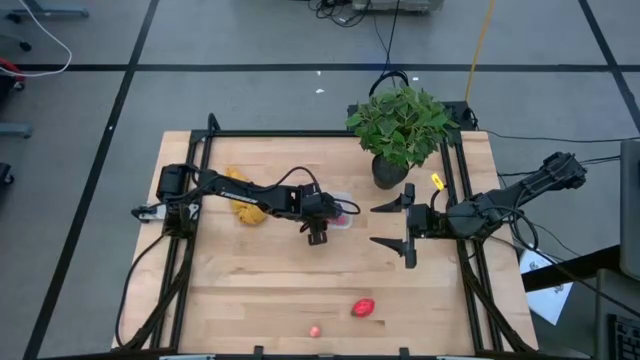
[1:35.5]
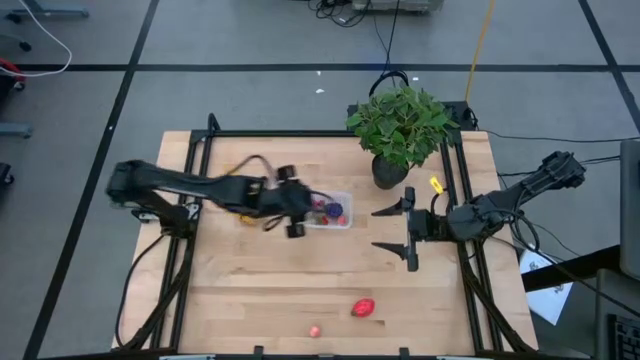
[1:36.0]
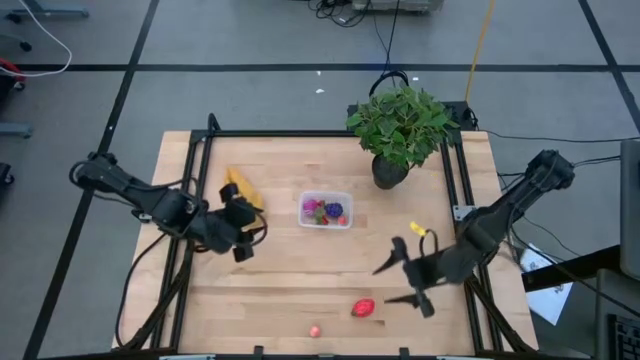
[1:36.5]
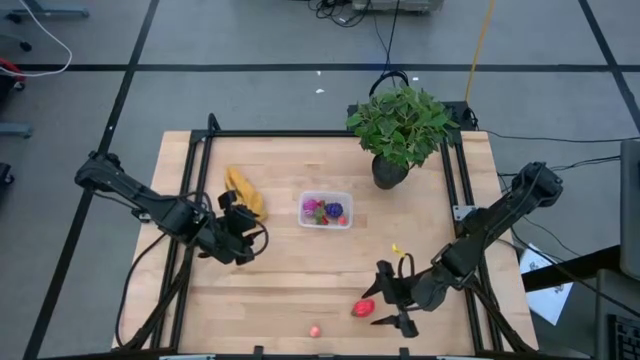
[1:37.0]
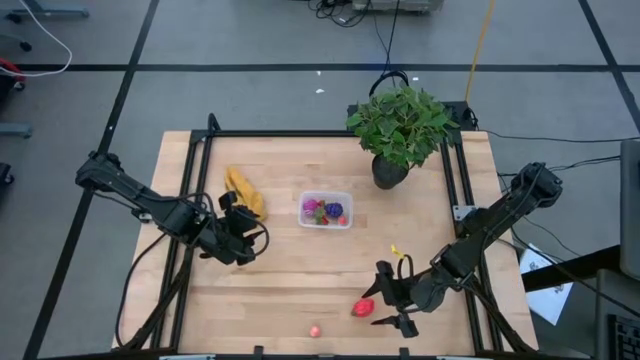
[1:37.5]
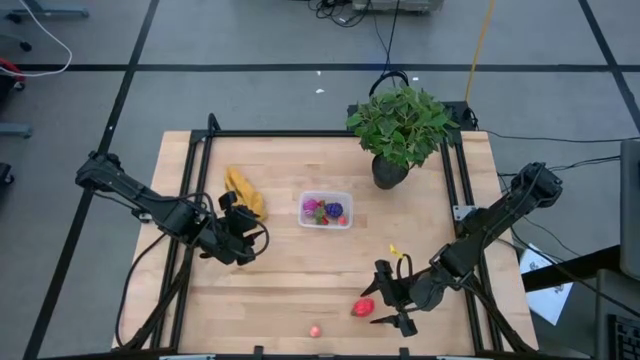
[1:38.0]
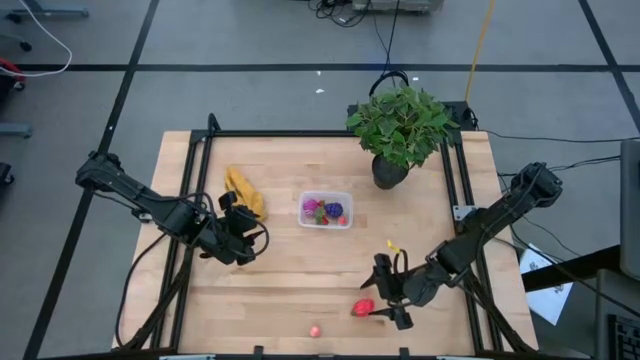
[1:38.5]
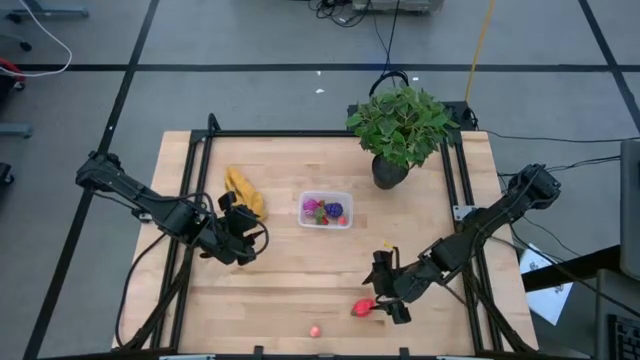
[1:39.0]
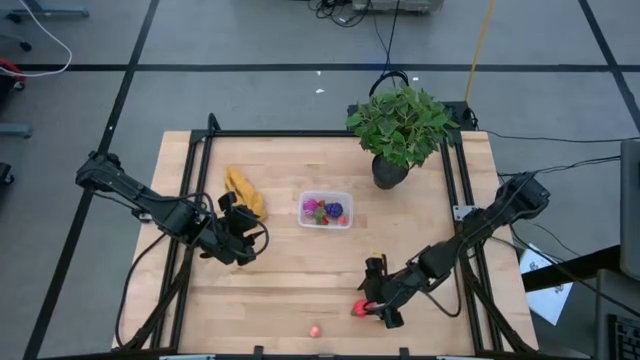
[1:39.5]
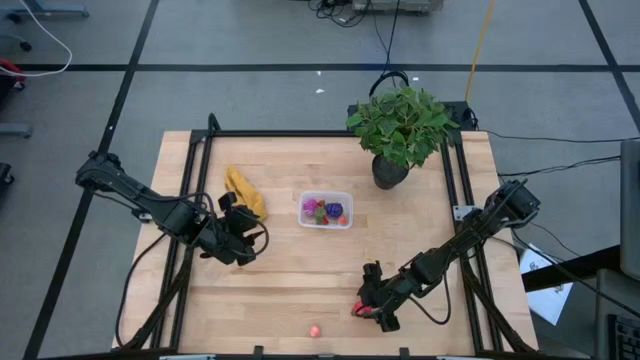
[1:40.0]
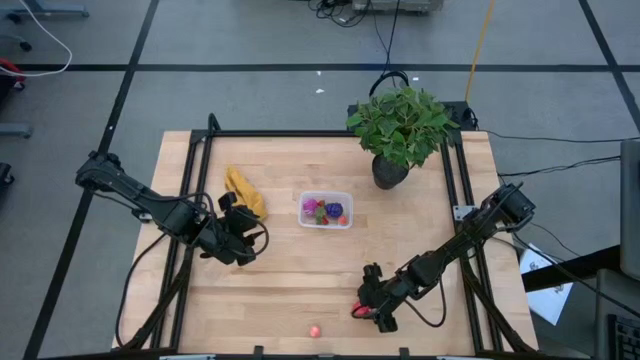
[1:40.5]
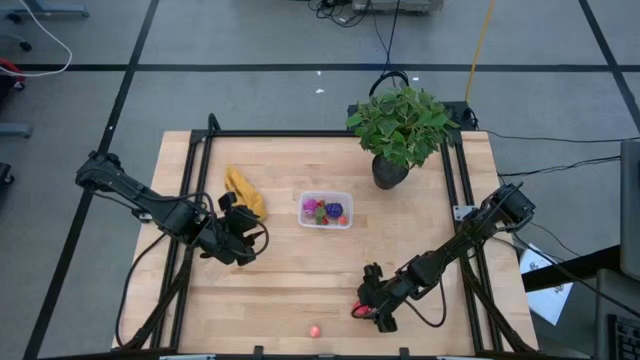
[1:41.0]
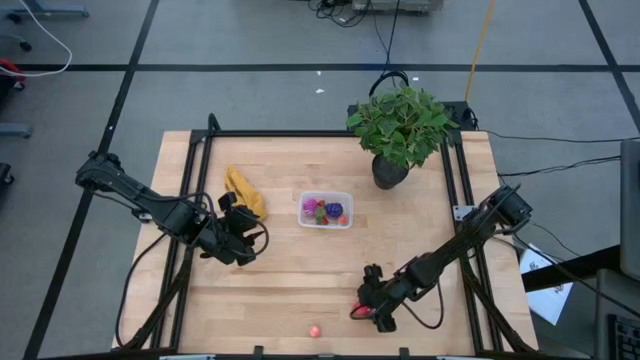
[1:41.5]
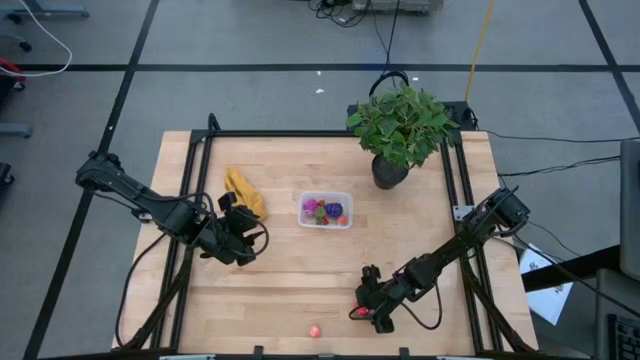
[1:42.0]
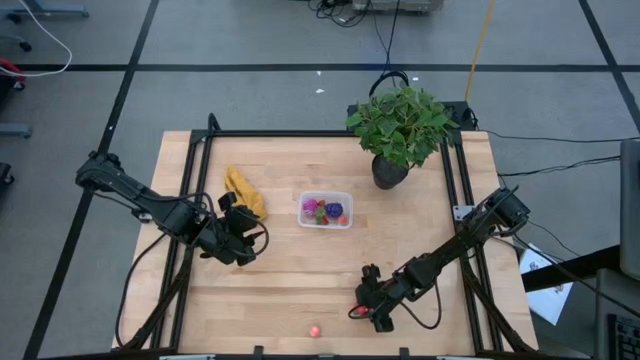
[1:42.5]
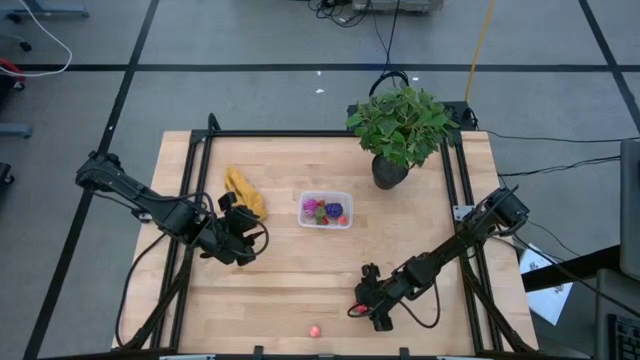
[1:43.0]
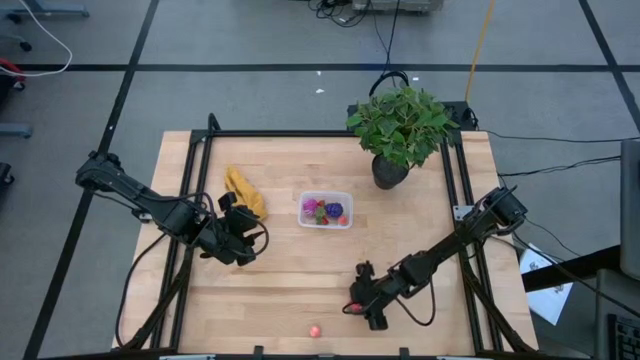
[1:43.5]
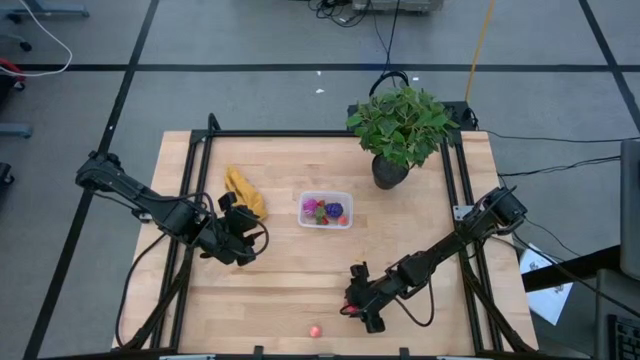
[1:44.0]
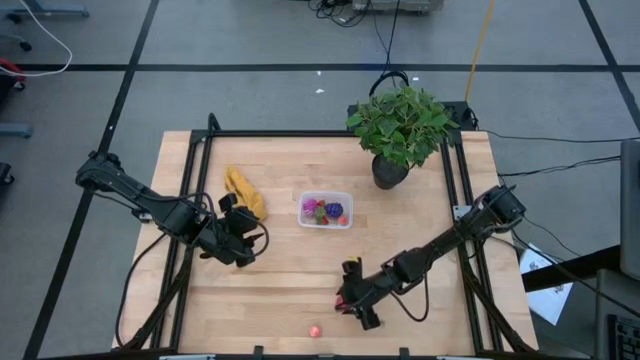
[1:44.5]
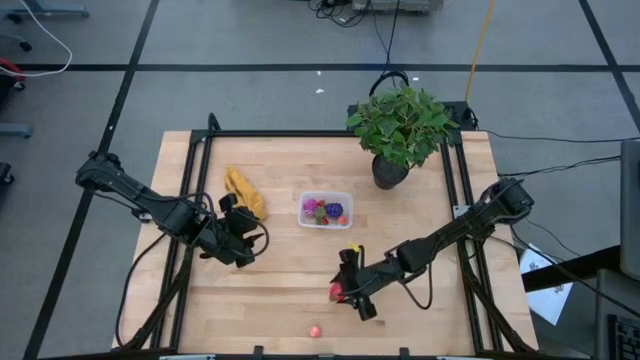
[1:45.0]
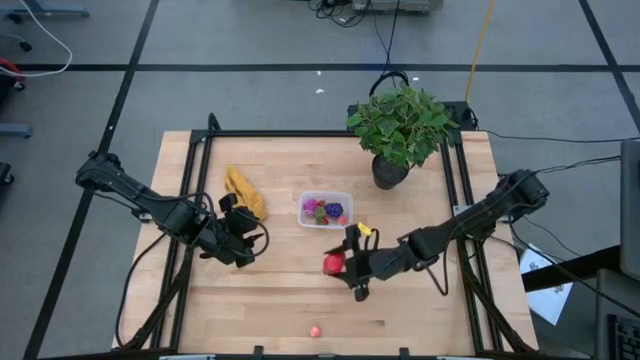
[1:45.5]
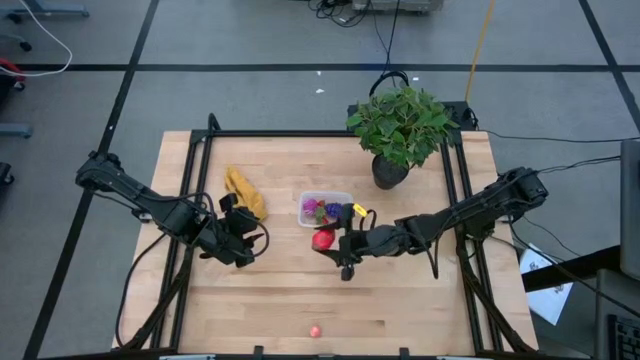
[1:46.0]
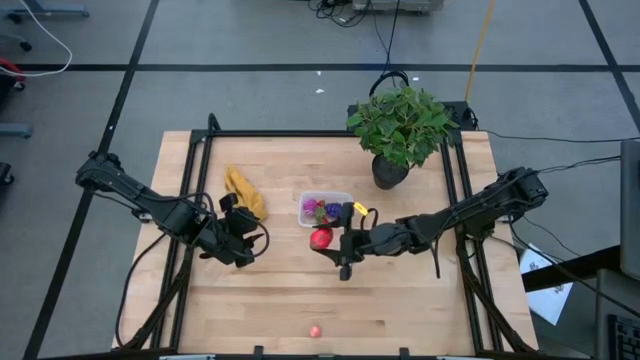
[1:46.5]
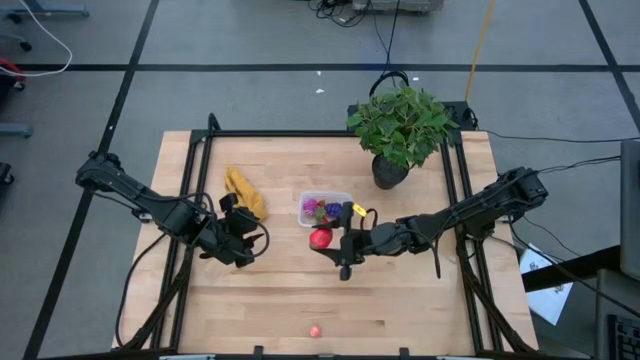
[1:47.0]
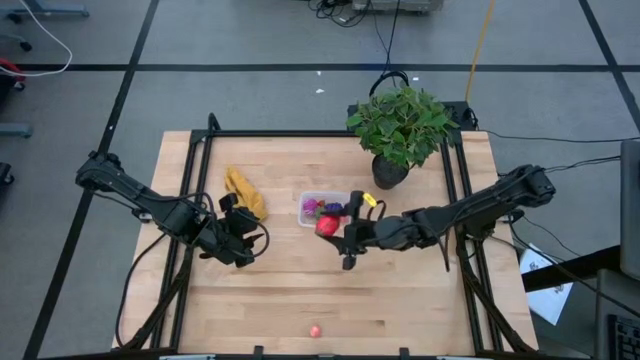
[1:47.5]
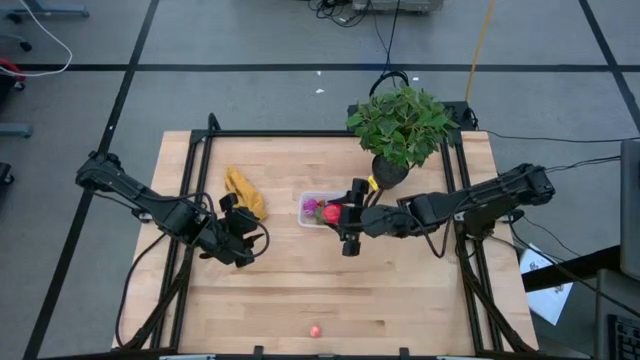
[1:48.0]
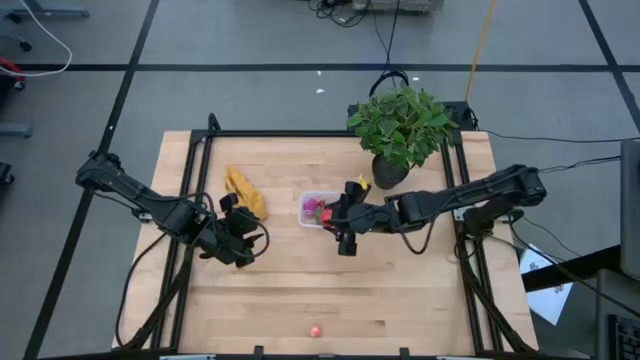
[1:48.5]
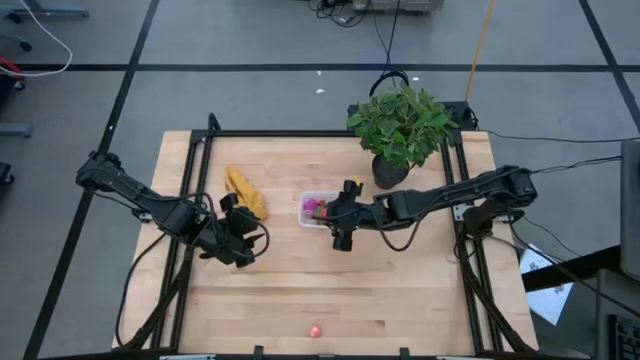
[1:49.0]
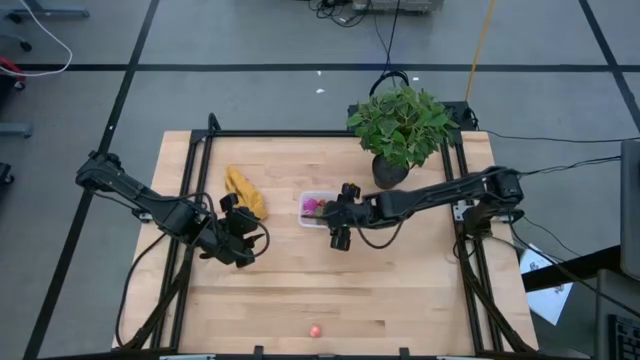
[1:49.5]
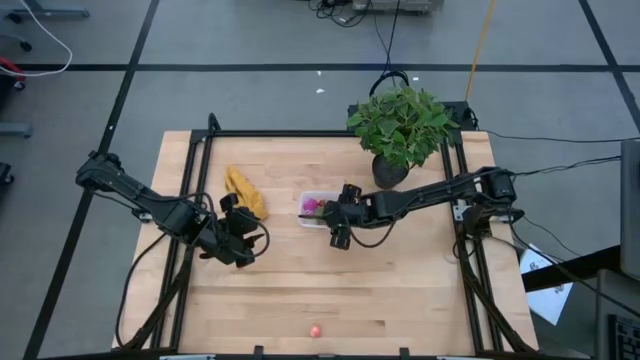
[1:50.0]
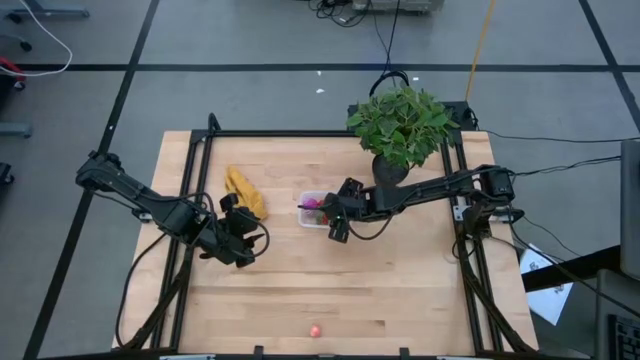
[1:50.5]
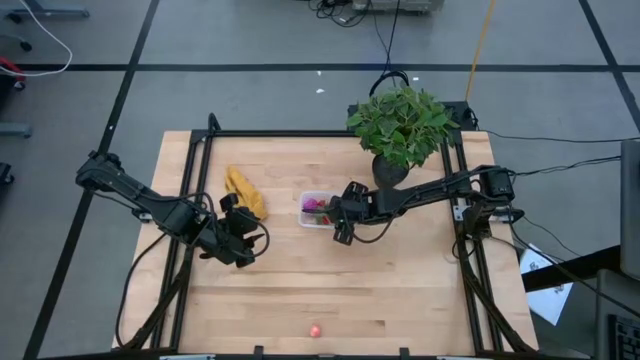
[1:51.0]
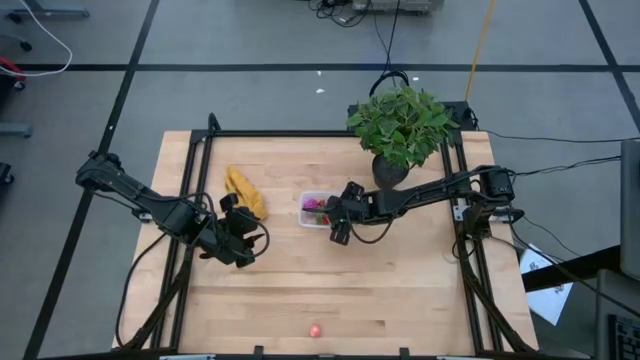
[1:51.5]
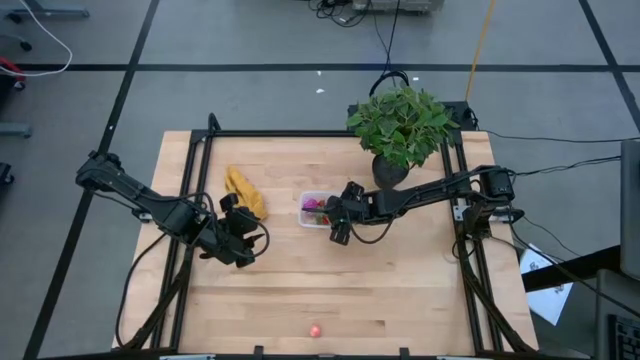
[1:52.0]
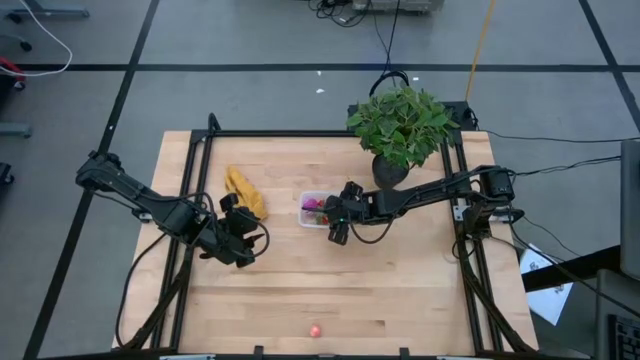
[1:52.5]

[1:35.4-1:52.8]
Task: Pick and placing Produce into tupperware
Put the pink dragon fruit into the transparent bin

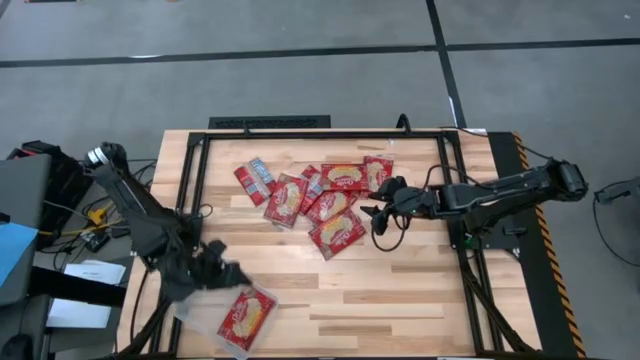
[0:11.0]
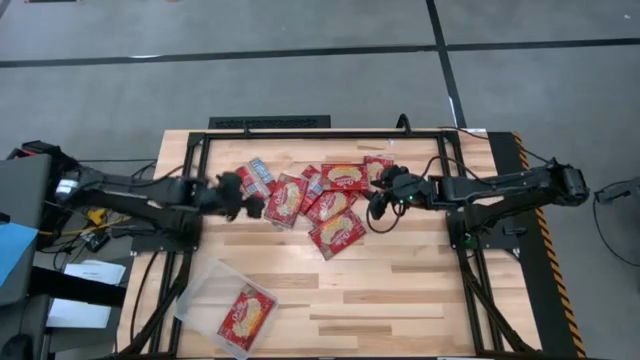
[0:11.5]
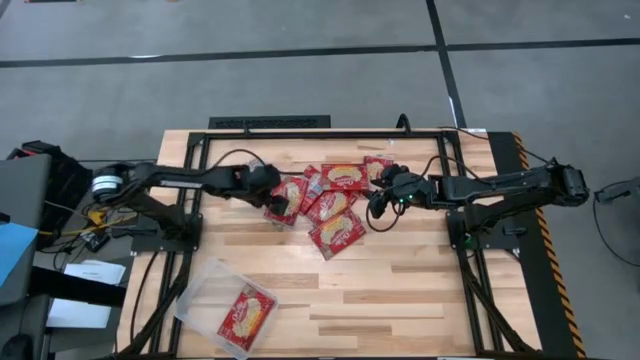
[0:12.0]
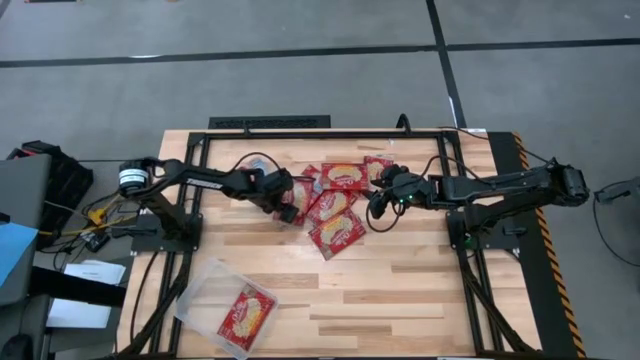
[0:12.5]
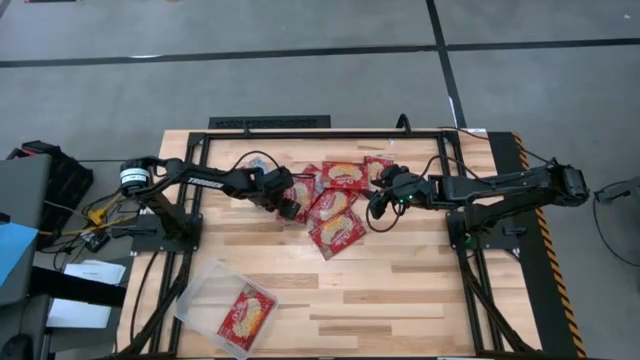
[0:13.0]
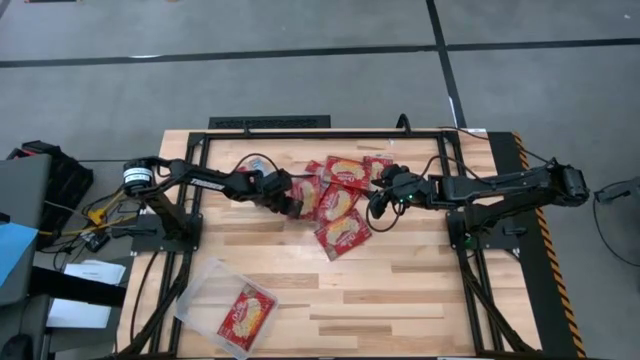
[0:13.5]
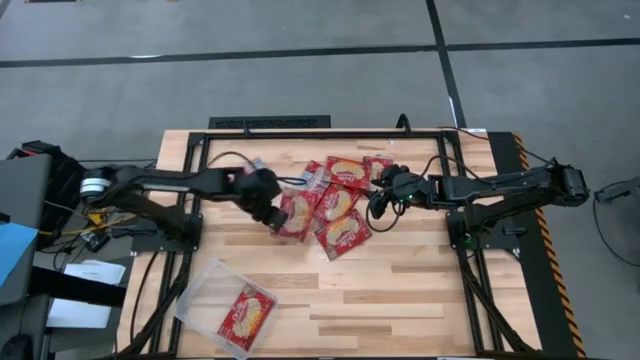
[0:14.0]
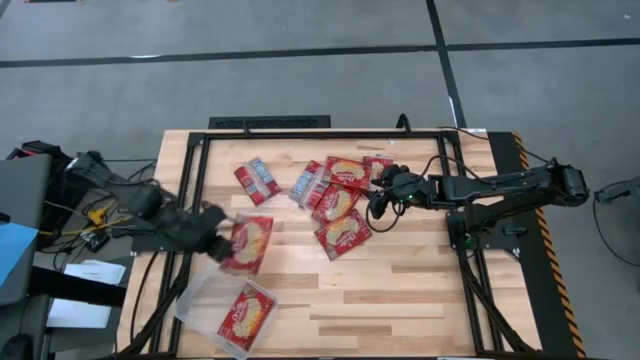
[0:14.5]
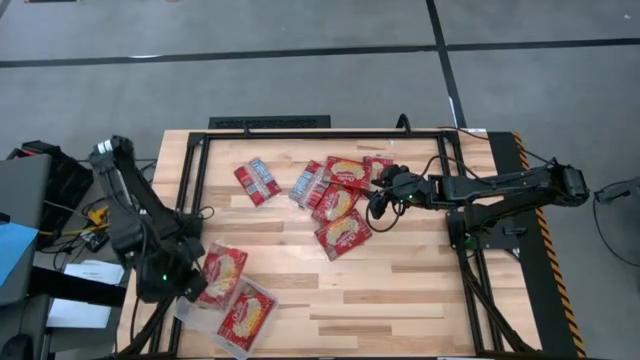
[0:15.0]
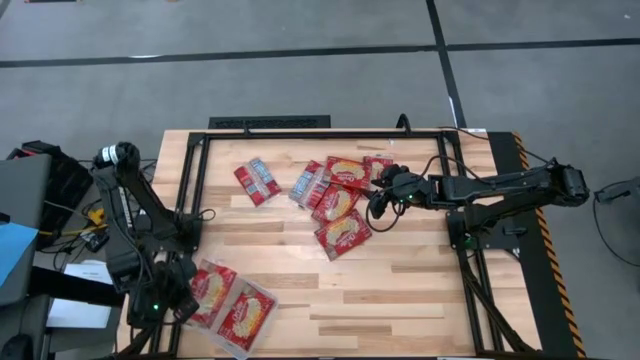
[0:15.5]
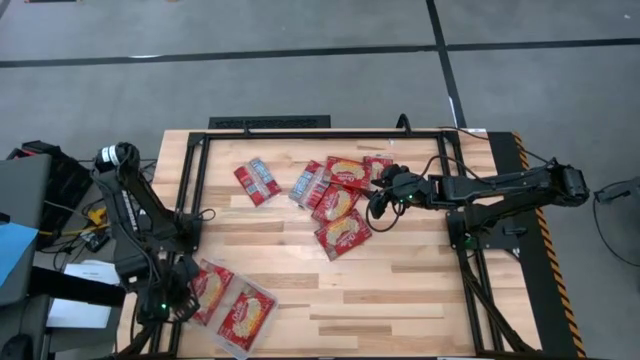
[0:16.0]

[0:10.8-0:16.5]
Task: Sort popcorn bags into baskets
Put the red popcorn bag into the transparent bin
